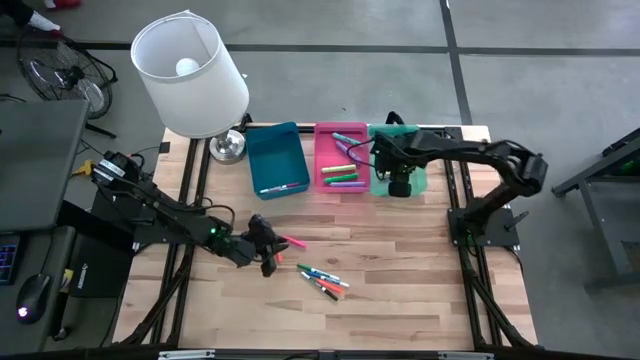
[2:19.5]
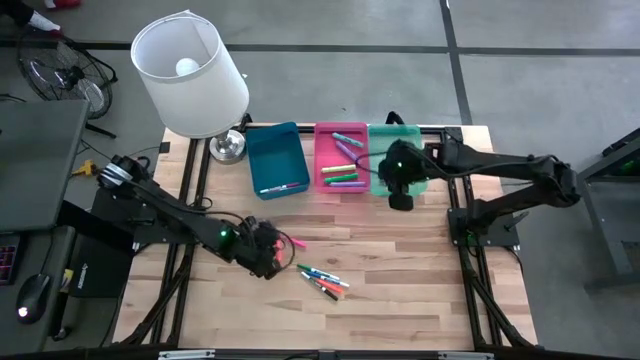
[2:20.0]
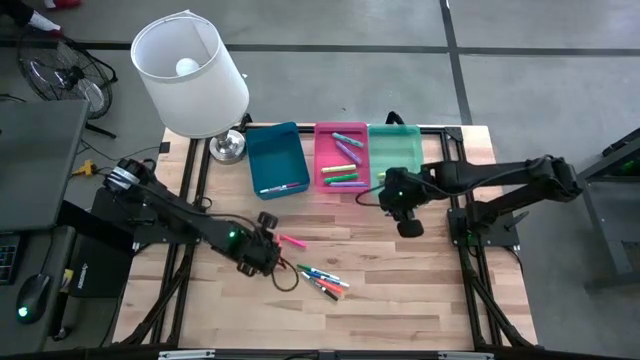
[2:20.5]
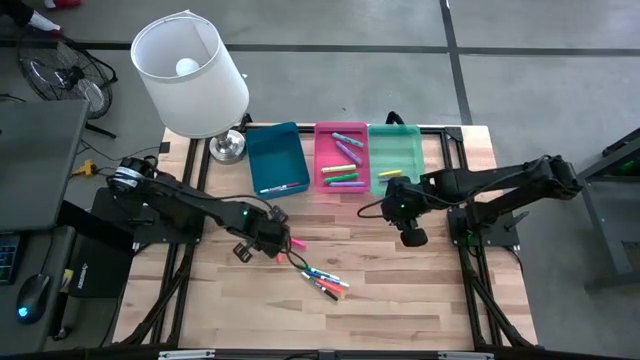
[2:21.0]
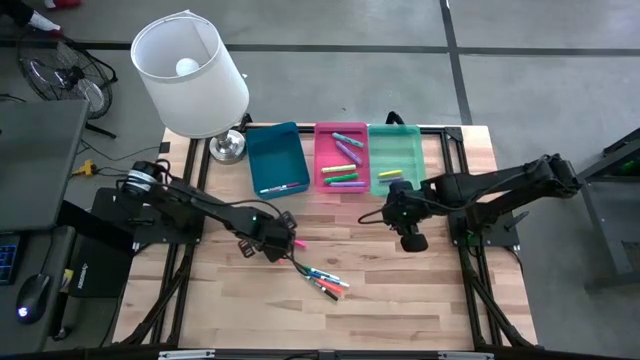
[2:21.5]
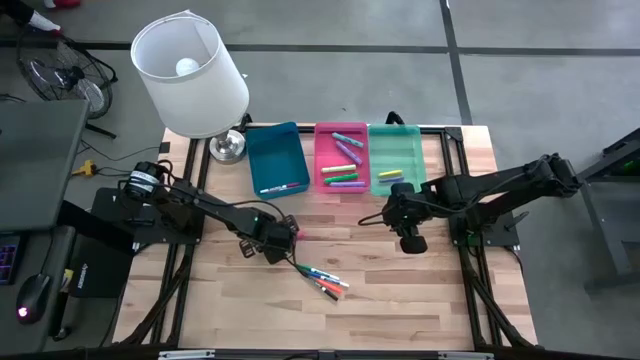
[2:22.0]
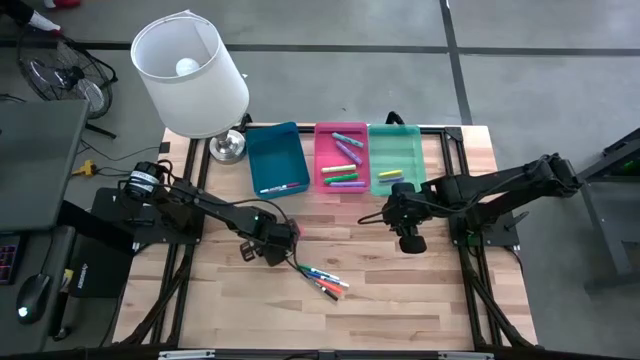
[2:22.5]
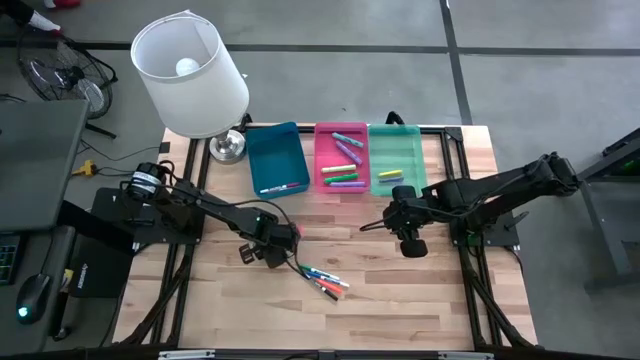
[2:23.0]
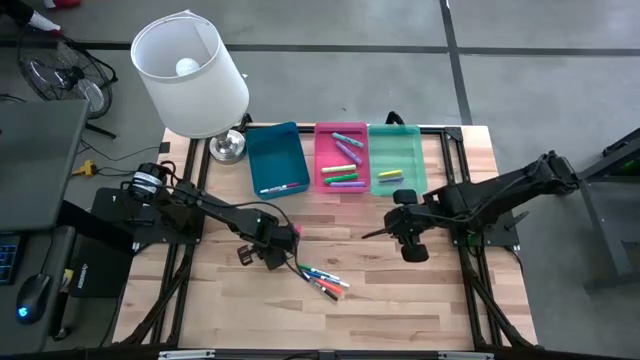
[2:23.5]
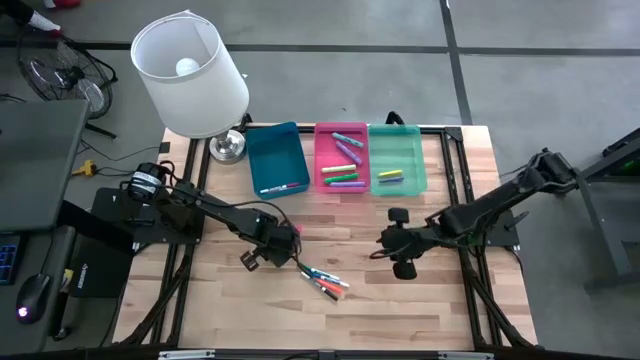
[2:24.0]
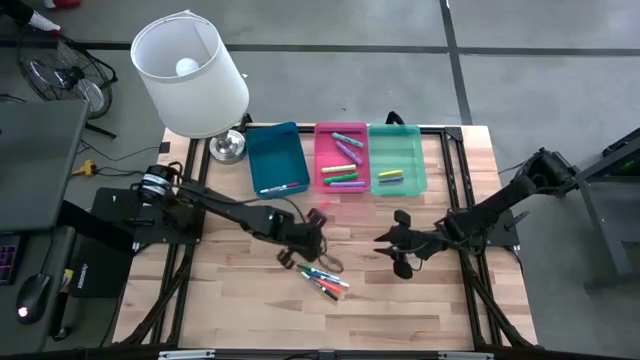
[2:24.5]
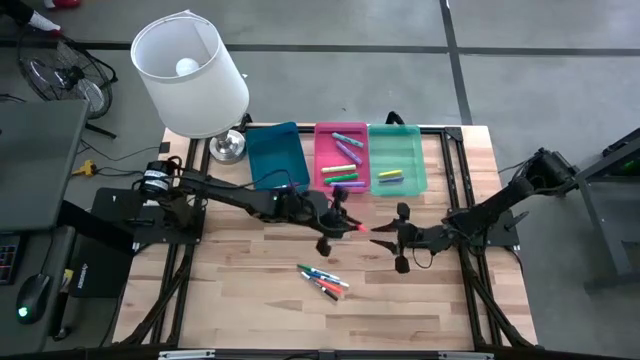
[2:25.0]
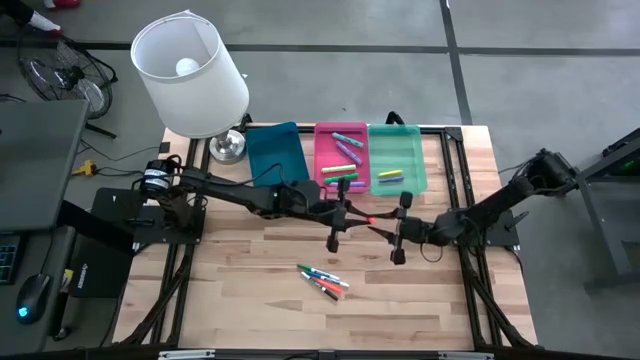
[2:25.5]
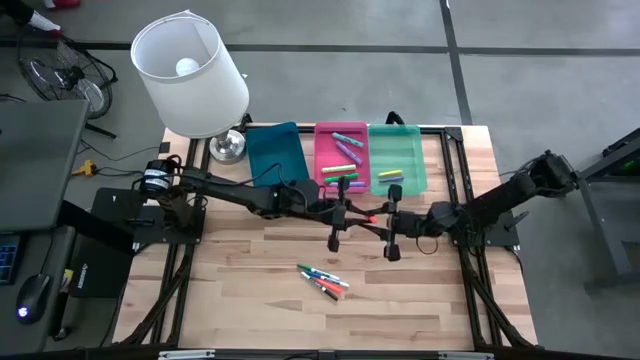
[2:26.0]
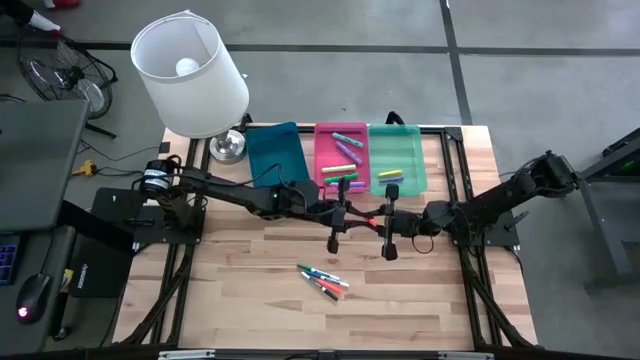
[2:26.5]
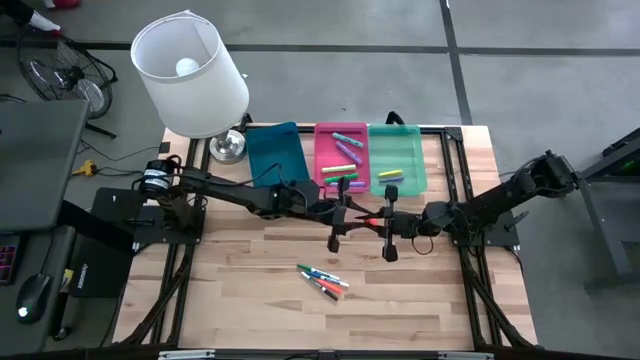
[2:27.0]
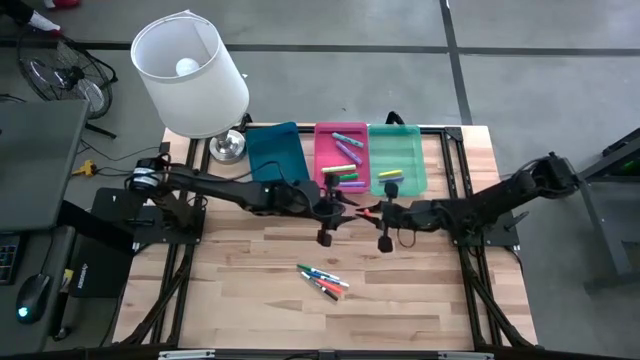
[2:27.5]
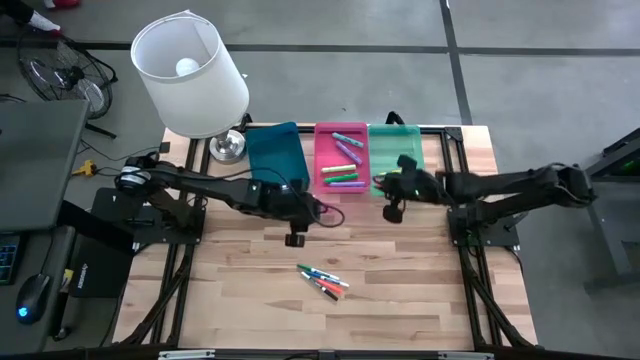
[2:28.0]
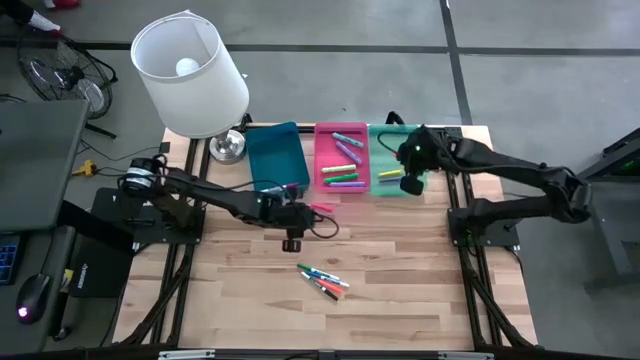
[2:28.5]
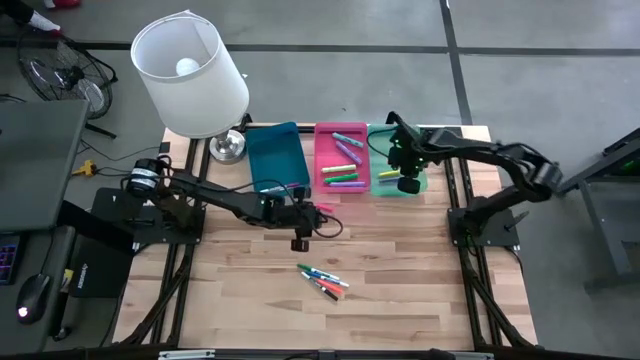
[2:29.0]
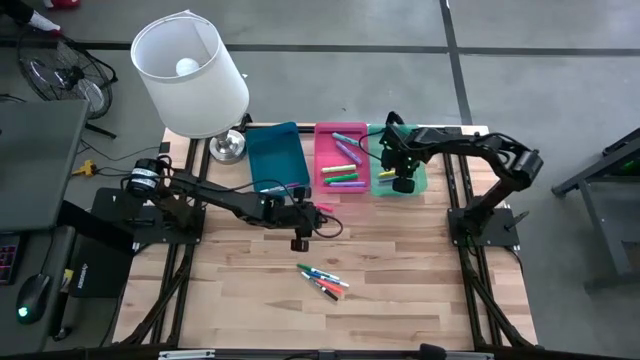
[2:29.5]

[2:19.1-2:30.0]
Task: Pick & Place Markers
Put the top orange pen into the green bin

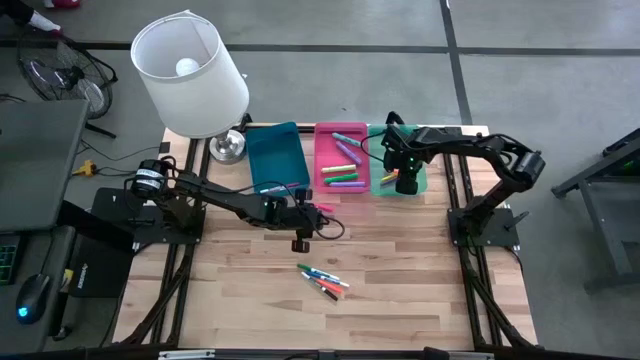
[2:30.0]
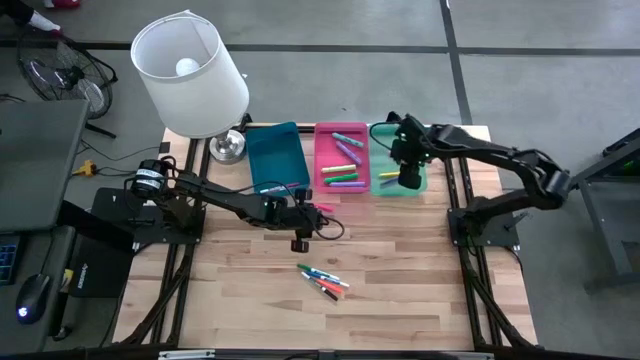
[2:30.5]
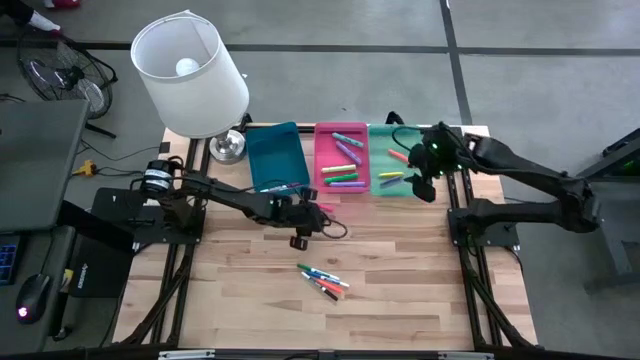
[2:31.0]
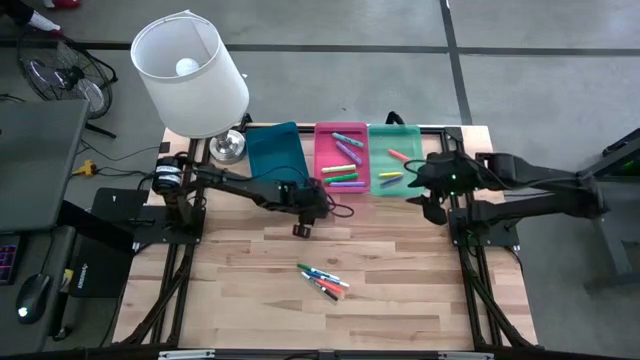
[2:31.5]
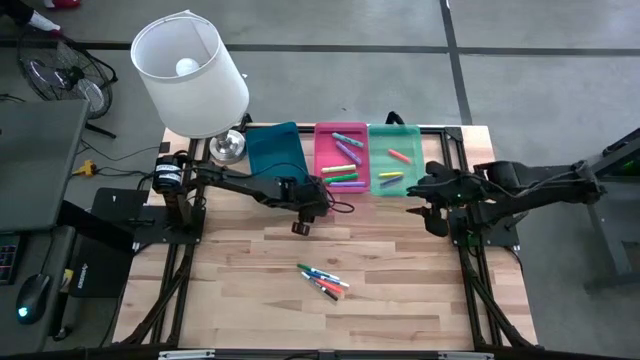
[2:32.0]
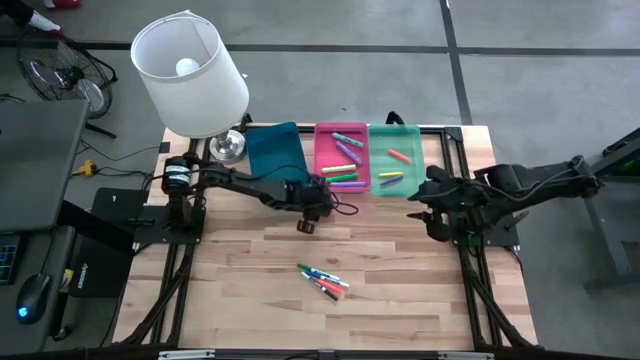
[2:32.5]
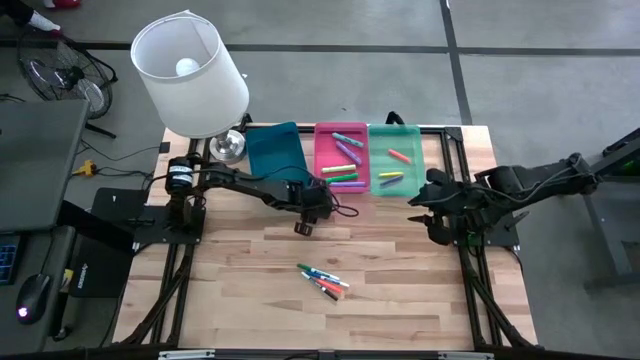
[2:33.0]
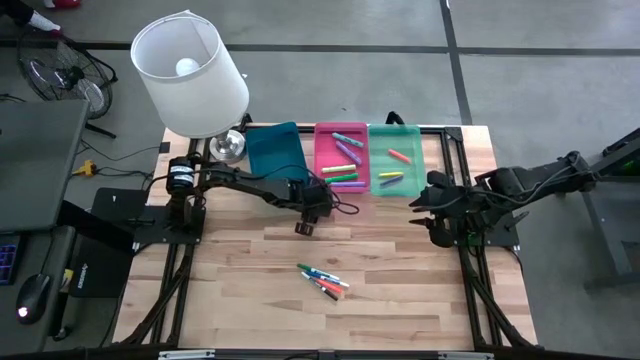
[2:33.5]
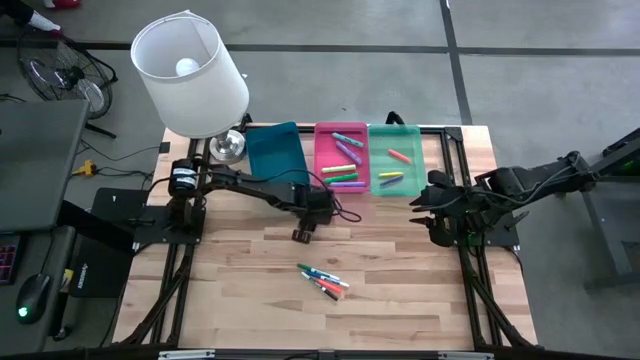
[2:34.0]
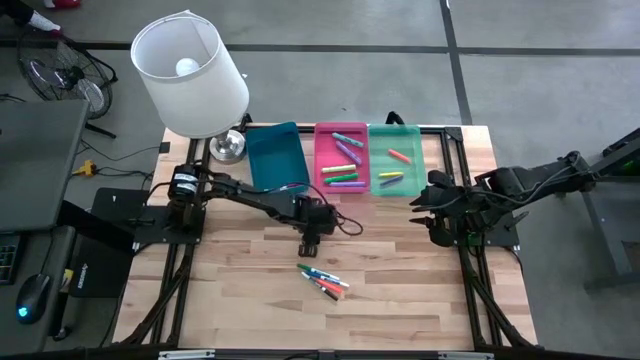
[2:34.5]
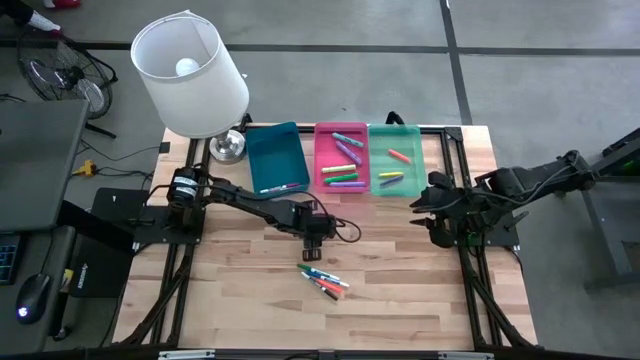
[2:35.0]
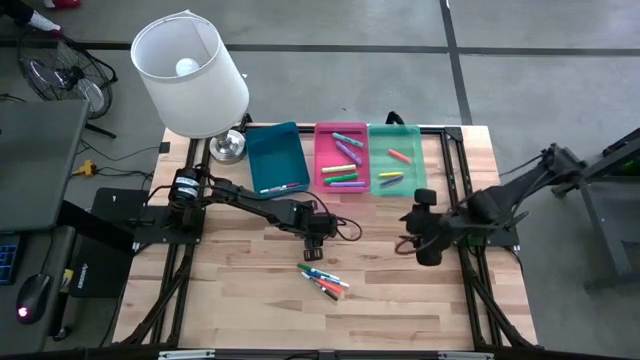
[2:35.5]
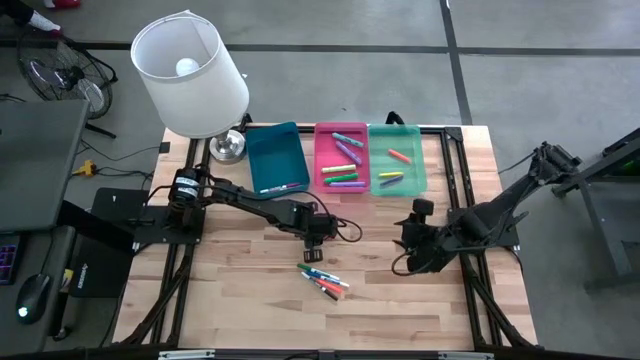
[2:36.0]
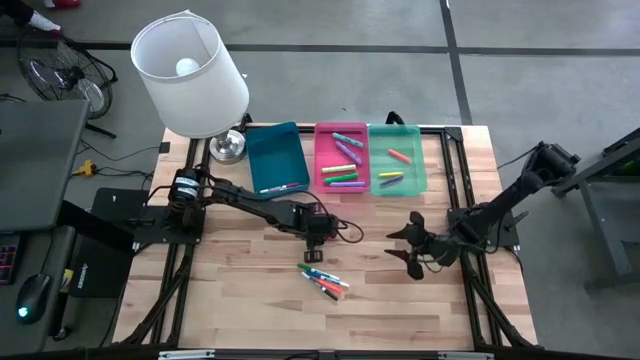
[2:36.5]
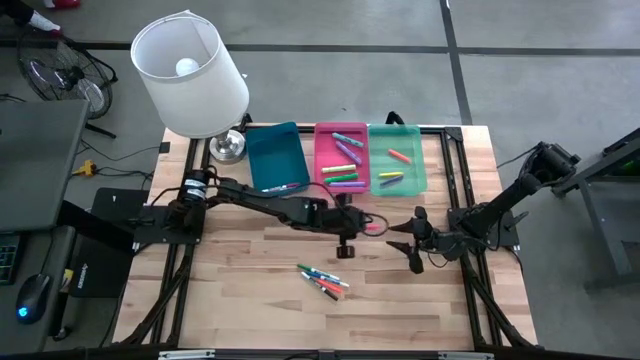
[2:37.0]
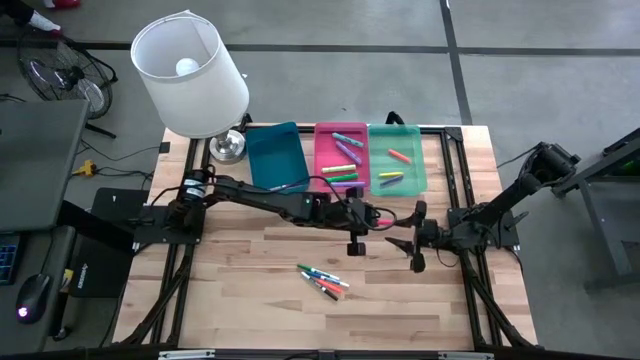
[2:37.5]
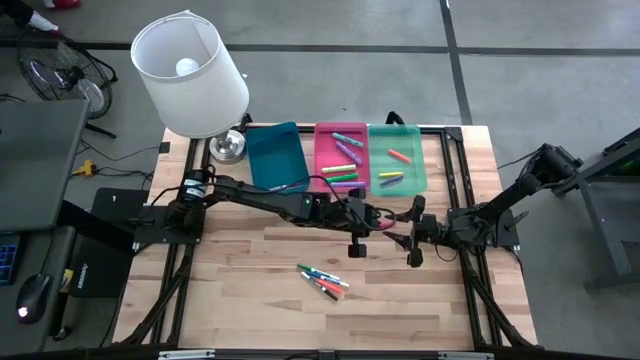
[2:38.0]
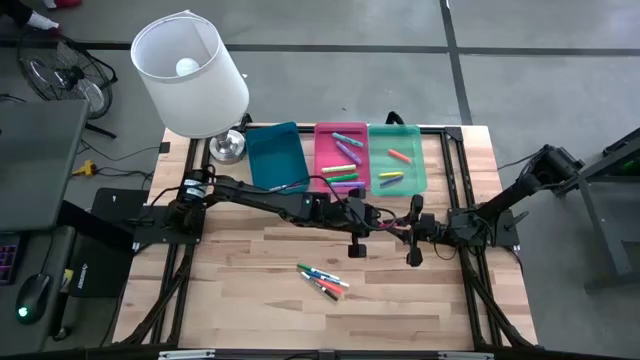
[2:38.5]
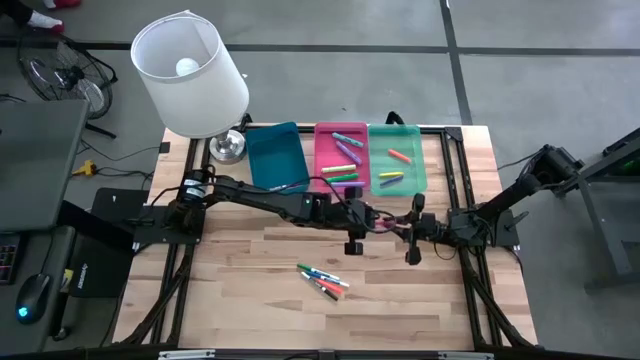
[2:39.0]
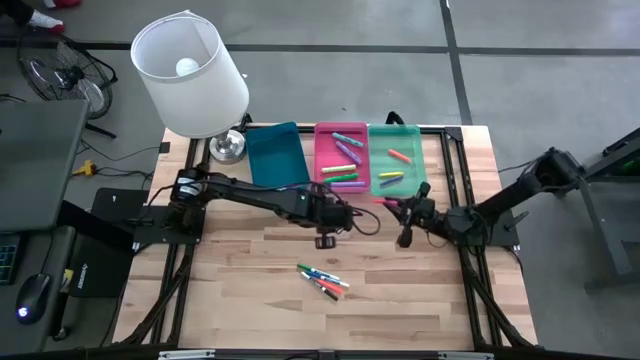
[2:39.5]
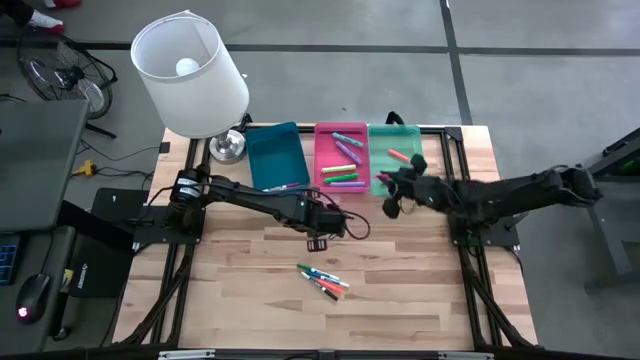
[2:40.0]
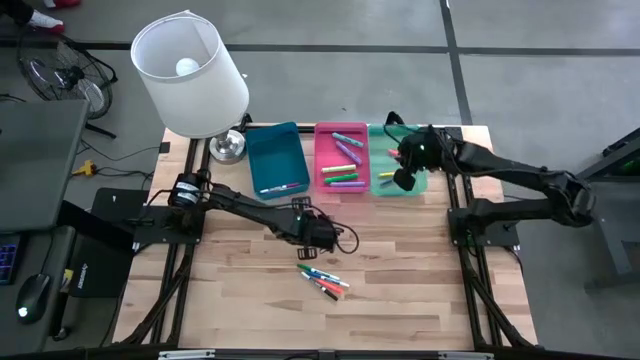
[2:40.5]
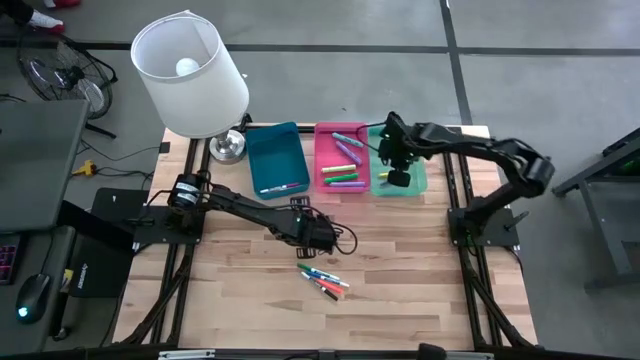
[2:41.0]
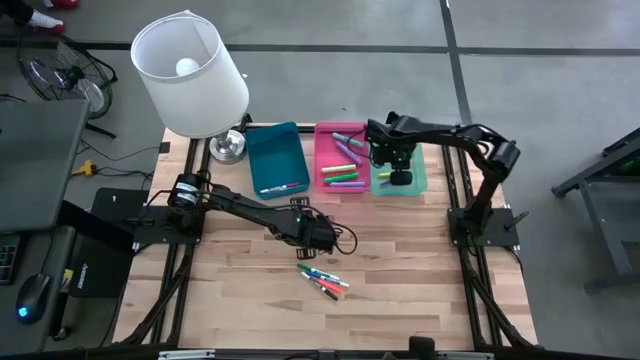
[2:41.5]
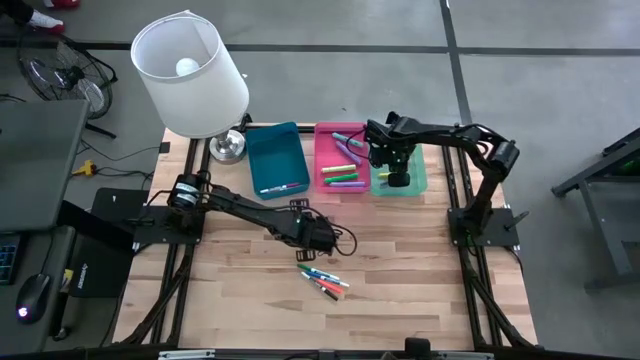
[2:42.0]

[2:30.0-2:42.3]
Put the pink pen into the green bin
